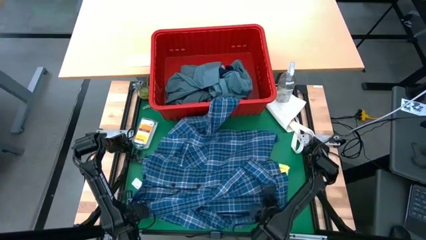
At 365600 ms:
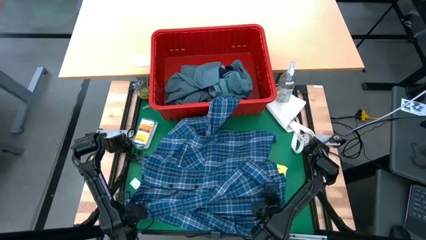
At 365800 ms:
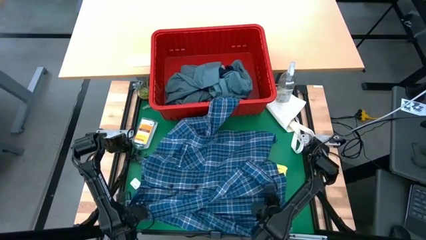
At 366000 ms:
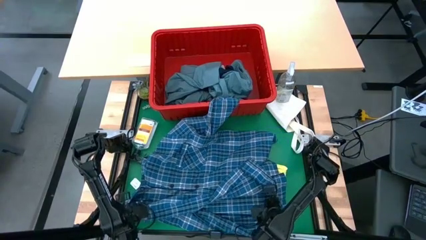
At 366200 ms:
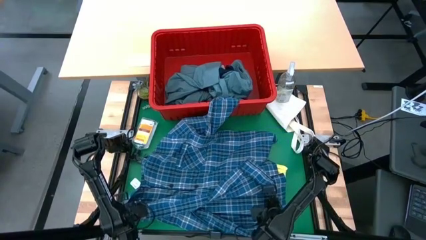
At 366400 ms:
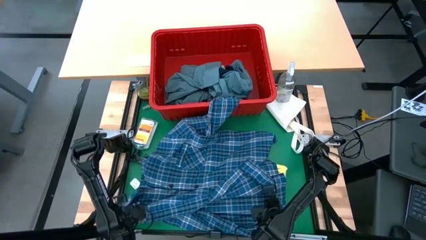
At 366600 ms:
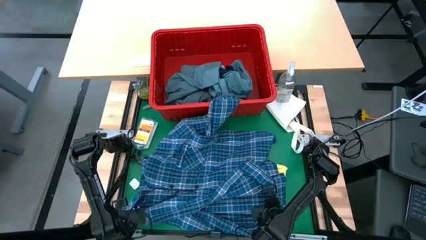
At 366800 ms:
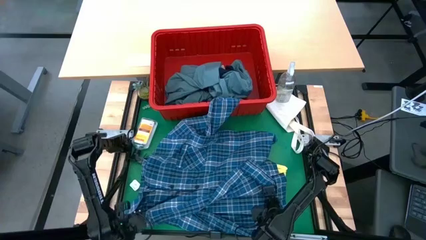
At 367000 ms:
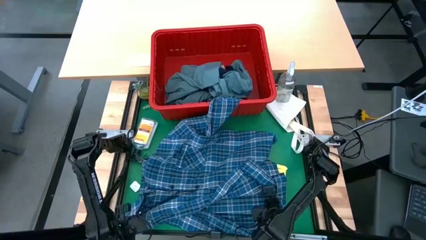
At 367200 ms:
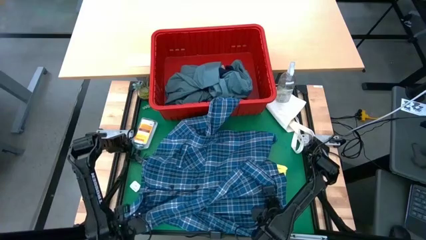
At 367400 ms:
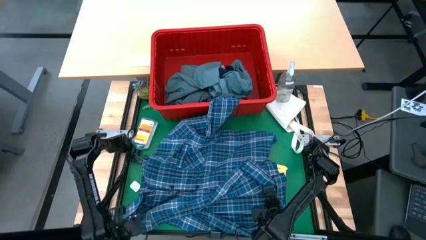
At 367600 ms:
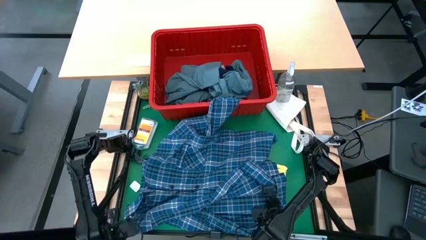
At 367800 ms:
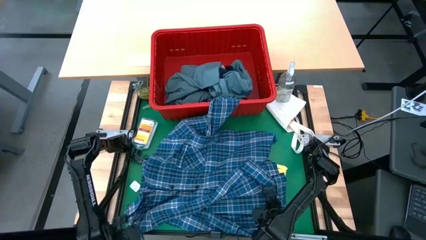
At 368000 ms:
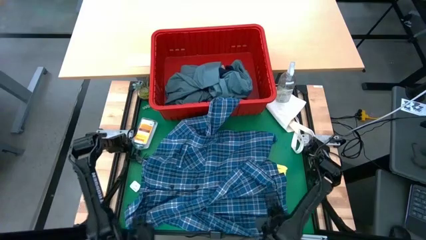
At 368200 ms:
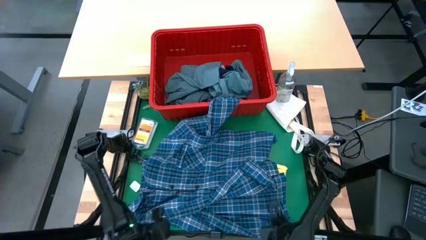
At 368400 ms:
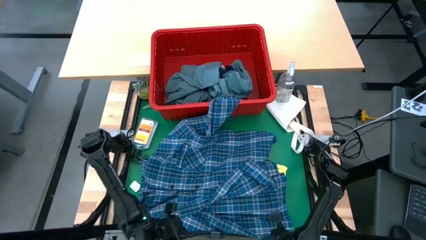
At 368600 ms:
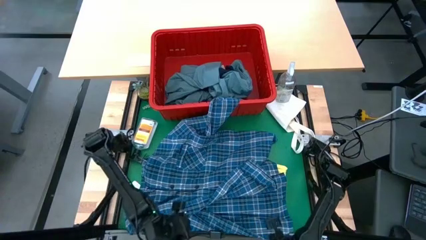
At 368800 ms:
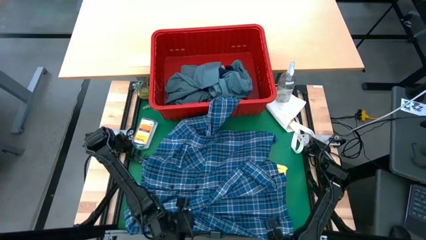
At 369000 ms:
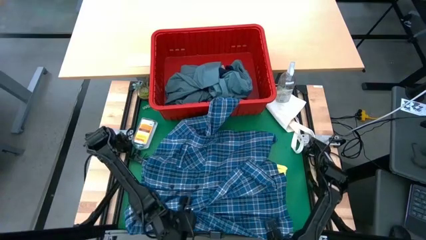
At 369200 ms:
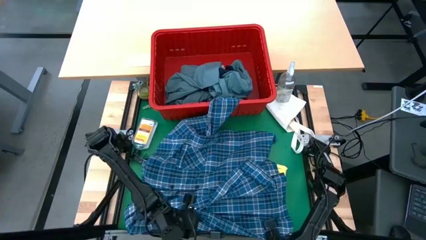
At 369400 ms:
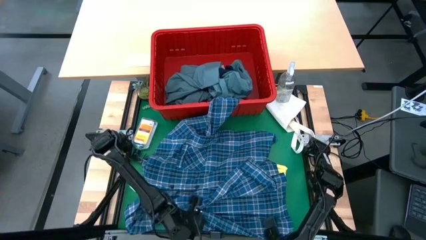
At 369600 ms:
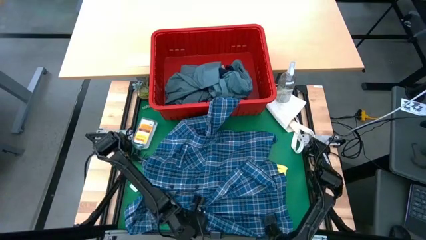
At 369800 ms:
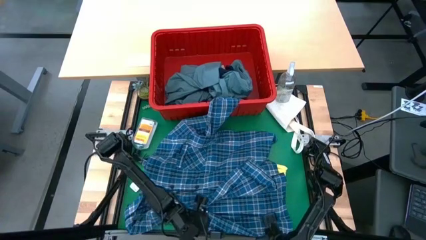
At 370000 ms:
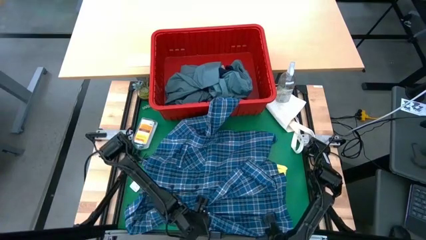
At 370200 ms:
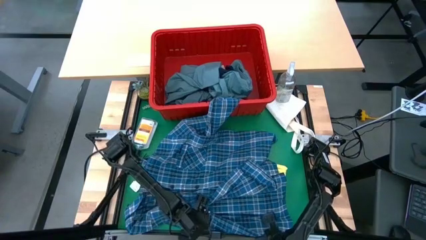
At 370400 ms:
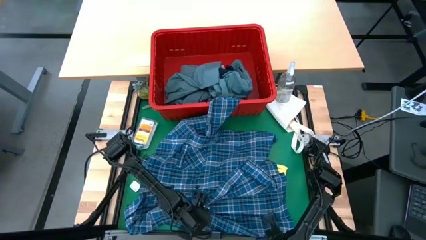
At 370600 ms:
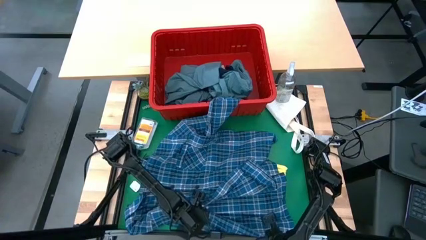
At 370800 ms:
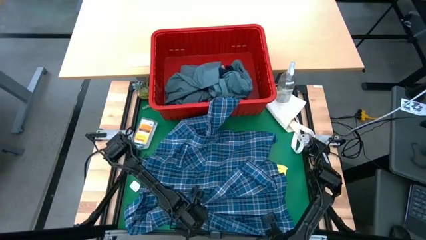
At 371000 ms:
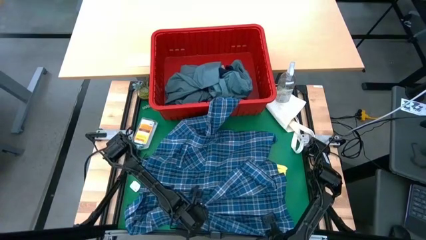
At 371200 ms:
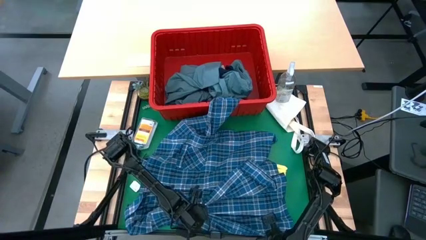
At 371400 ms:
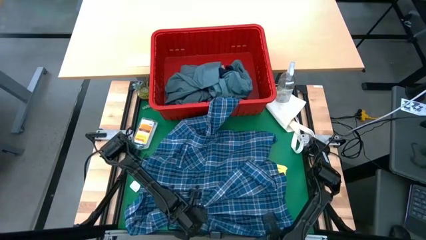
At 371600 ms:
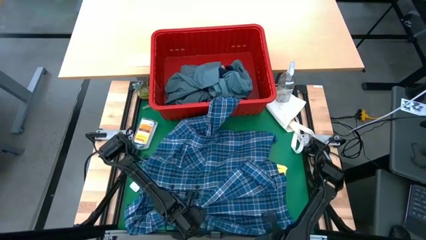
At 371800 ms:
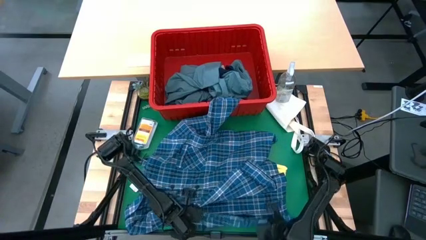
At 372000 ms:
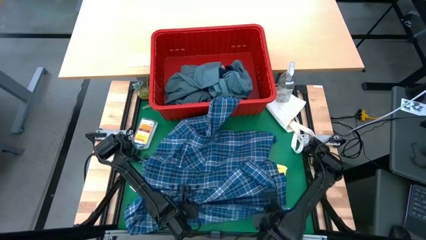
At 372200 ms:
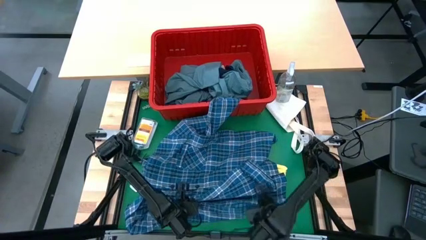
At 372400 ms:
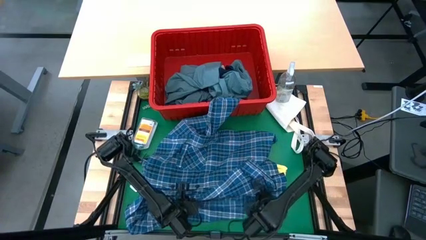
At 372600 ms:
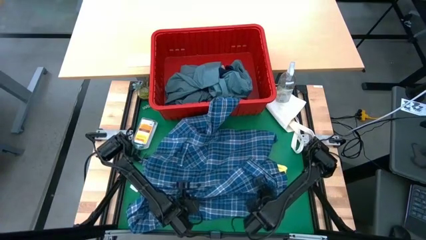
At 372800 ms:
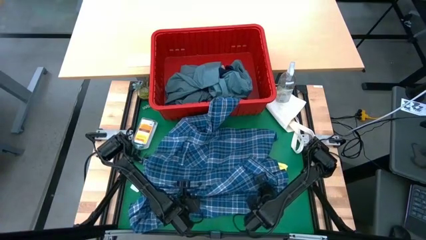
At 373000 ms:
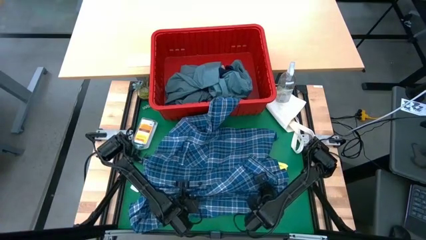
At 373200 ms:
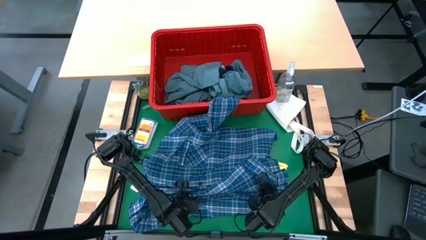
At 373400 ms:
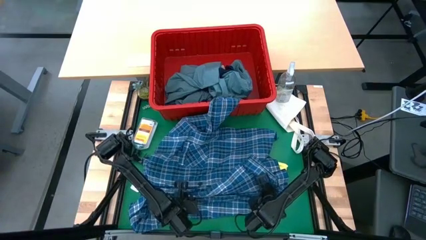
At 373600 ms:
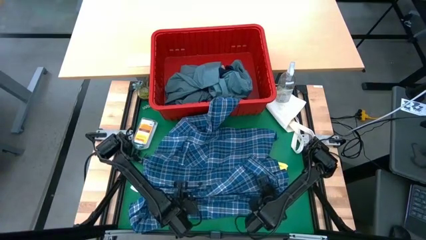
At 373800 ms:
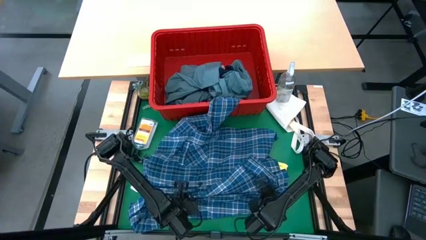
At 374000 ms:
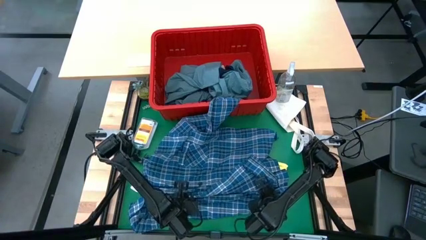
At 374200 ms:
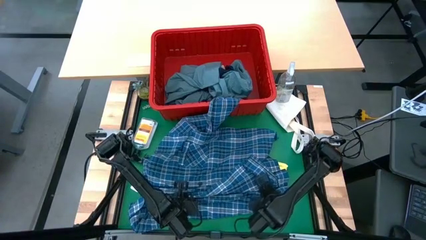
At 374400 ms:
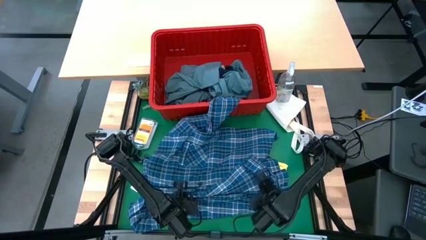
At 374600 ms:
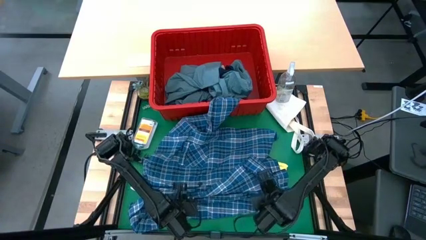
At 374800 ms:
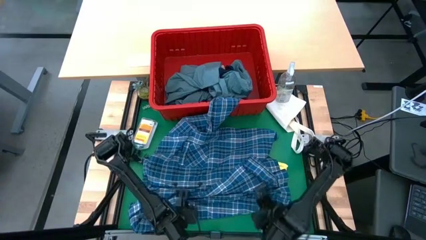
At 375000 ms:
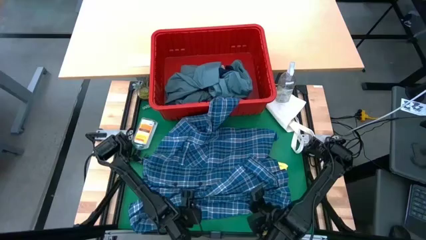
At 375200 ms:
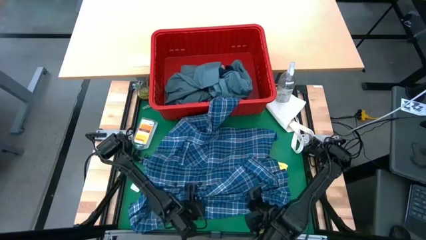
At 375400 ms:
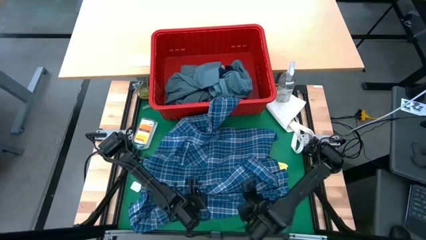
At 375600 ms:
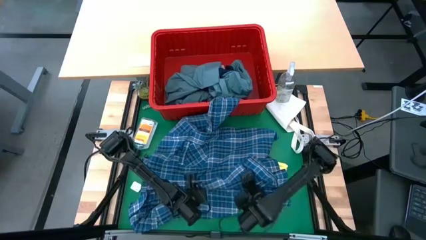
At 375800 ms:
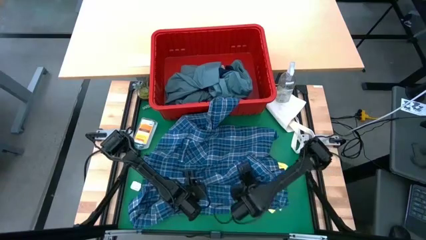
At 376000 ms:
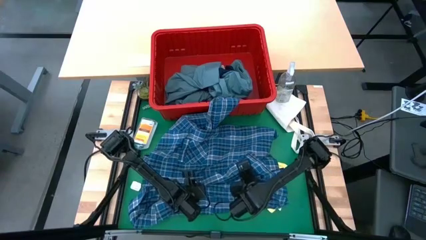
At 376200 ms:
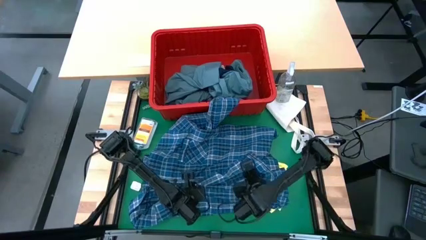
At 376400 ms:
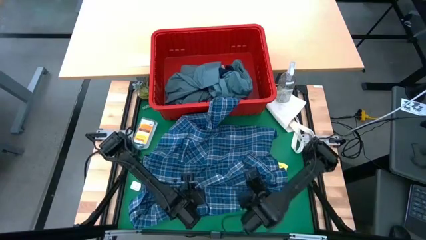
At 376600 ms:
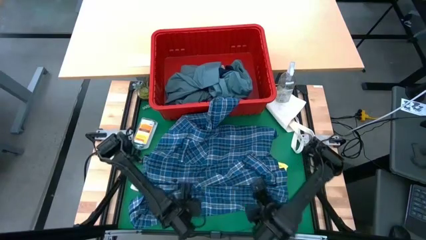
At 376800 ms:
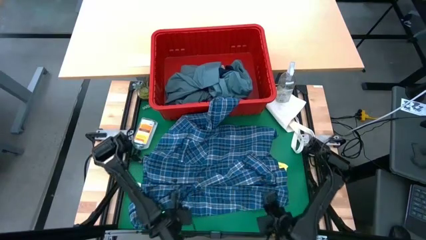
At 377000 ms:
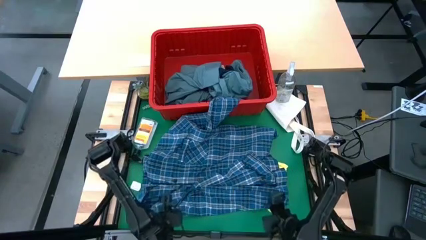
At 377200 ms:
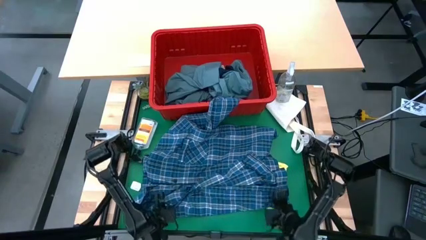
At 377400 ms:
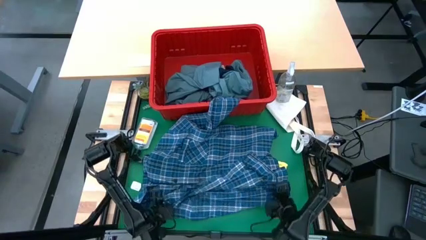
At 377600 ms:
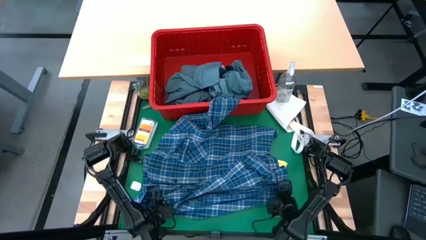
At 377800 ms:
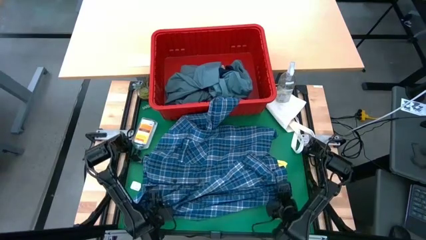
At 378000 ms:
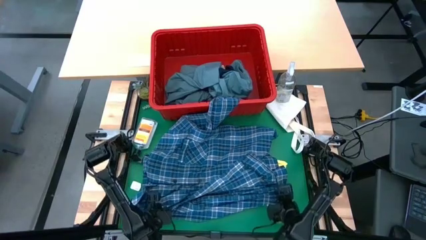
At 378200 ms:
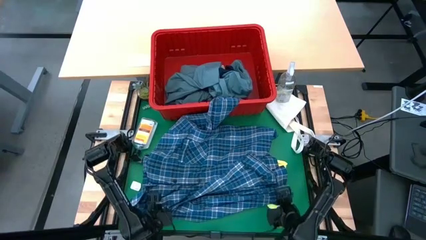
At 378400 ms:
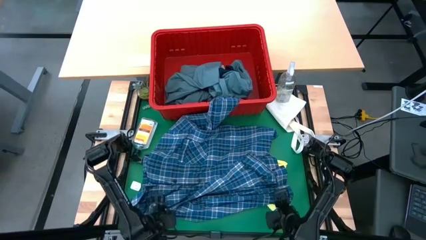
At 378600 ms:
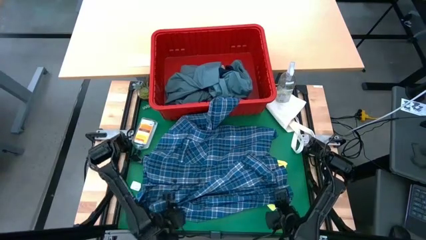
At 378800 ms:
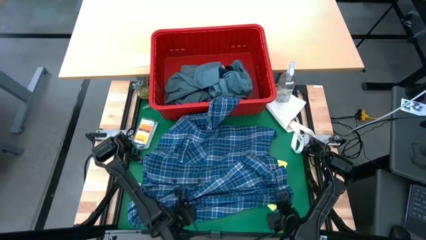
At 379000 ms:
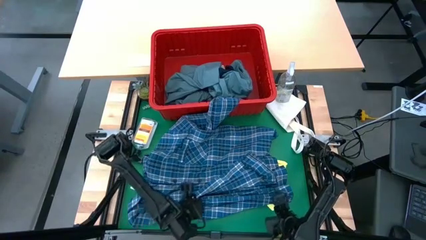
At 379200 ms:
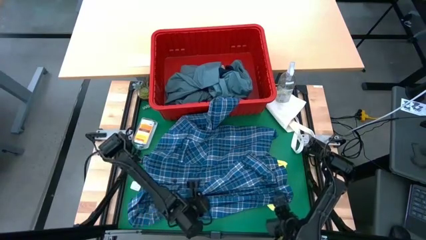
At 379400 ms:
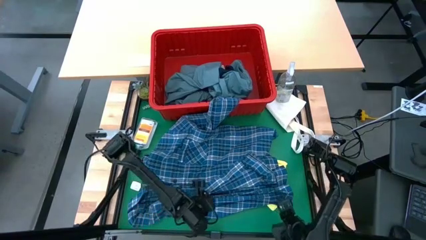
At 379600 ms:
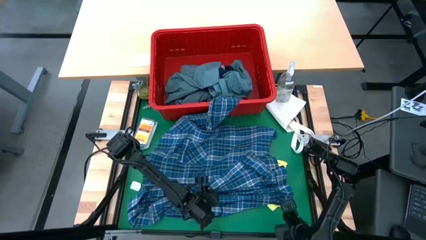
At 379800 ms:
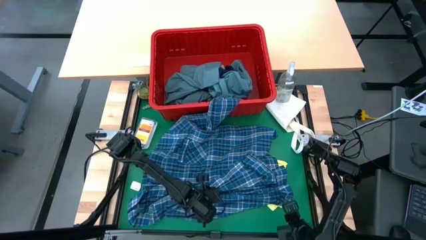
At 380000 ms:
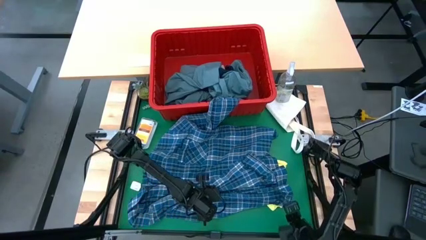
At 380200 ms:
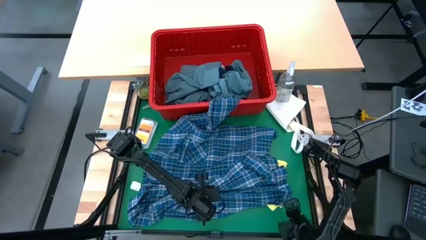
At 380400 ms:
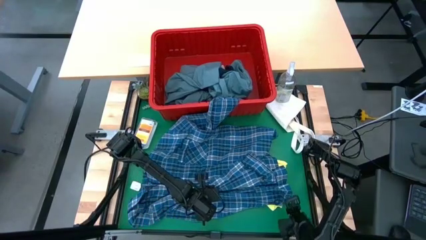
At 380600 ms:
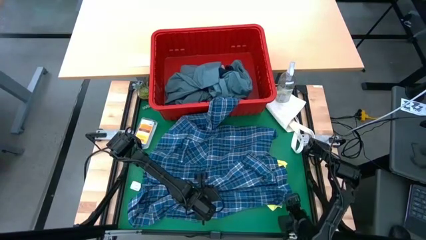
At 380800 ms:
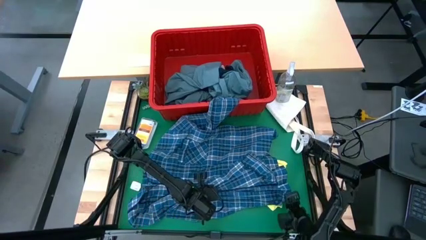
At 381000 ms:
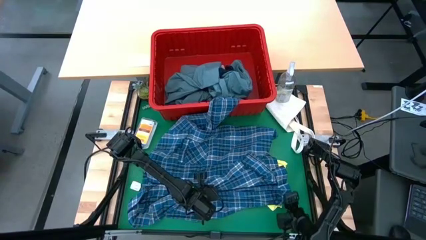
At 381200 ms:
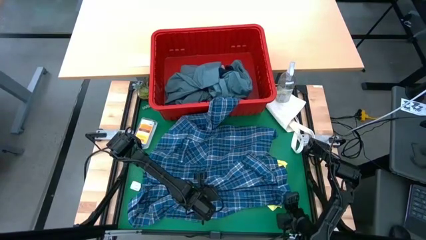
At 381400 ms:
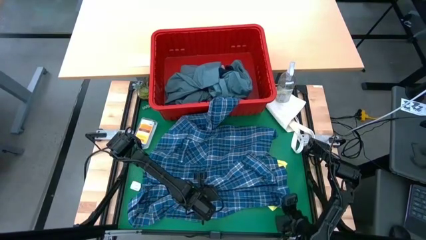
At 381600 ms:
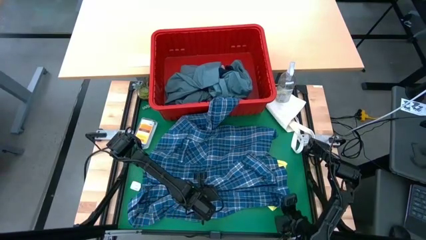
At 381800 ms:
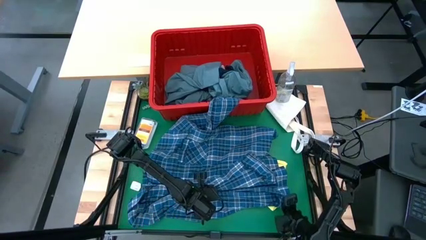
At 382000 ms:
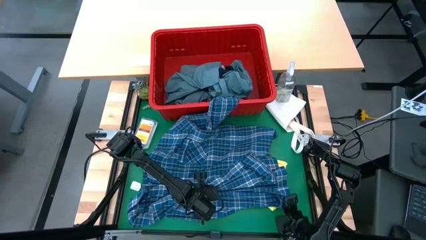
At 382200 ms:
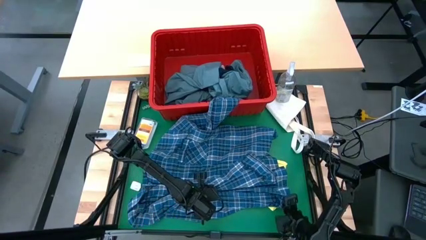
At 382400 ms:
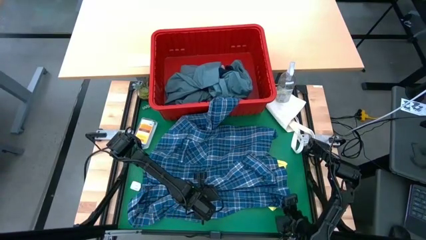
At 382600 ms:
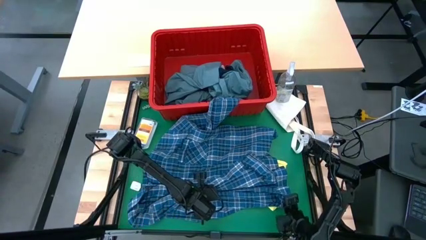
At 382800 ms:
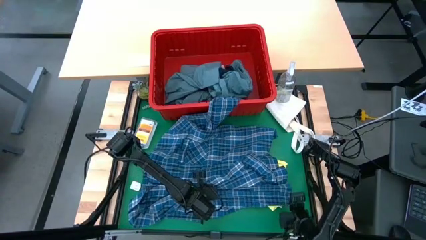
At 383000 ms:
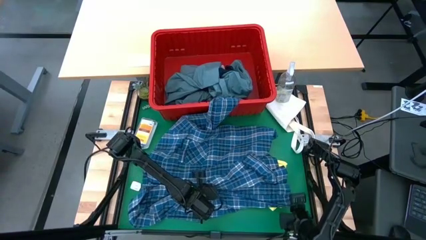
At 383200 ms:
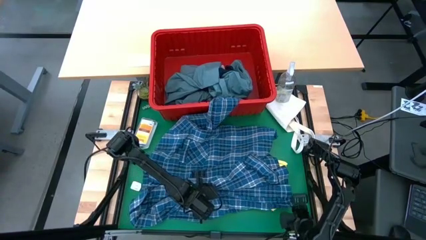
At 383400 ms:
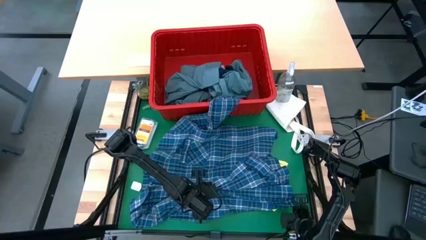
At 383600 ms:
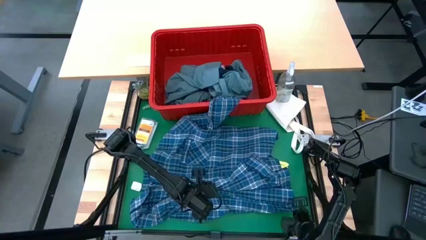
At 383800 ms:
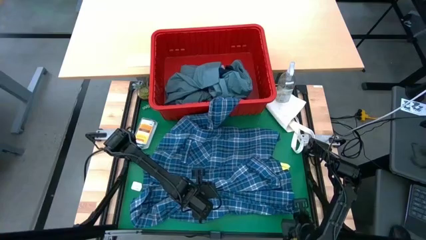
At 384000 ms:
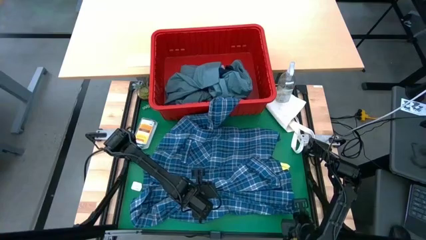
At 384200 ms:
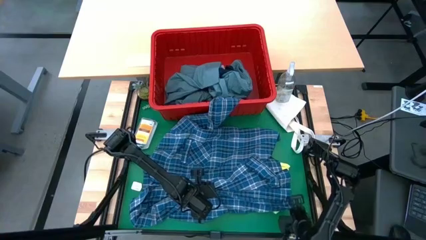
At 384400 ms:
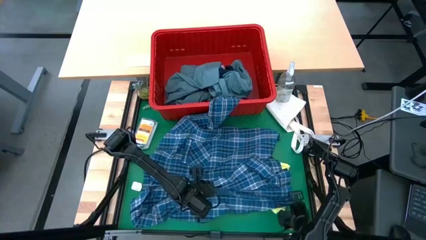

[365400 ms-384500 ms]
Task: Fold Laundry from Bin
Fold the blue shirt
